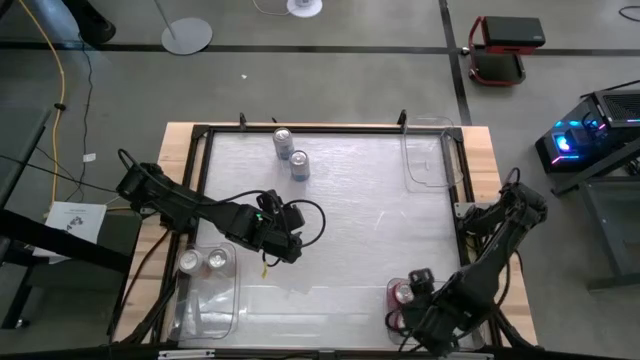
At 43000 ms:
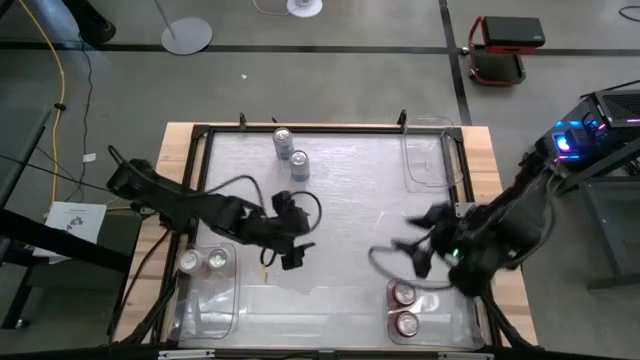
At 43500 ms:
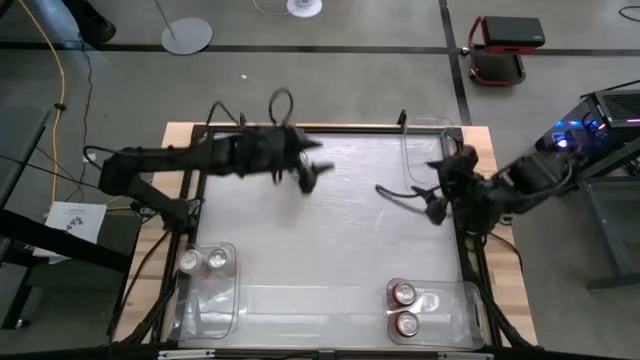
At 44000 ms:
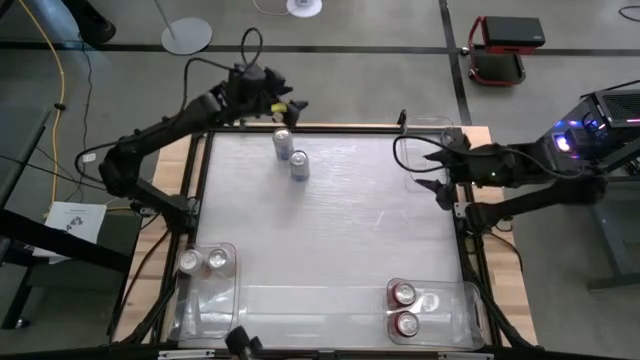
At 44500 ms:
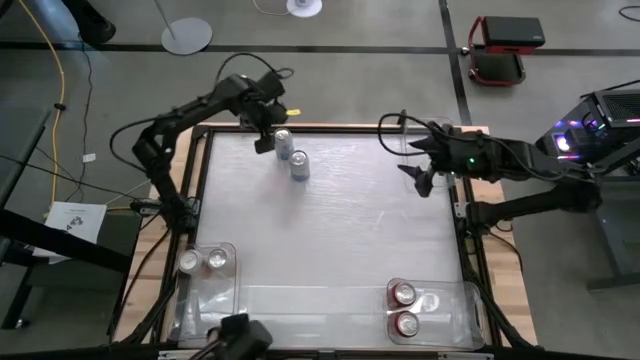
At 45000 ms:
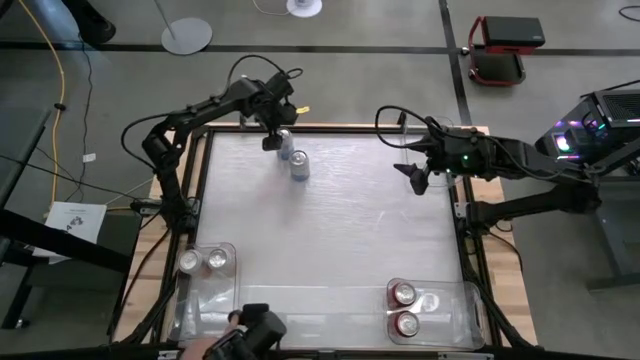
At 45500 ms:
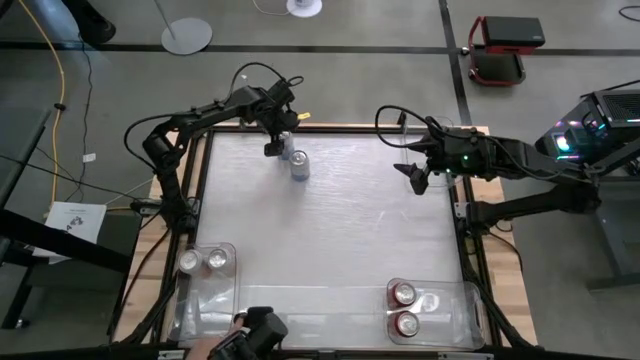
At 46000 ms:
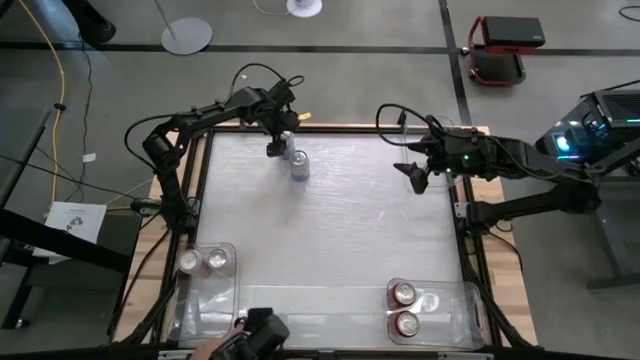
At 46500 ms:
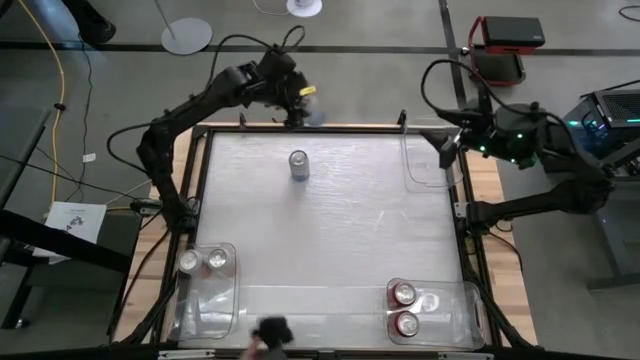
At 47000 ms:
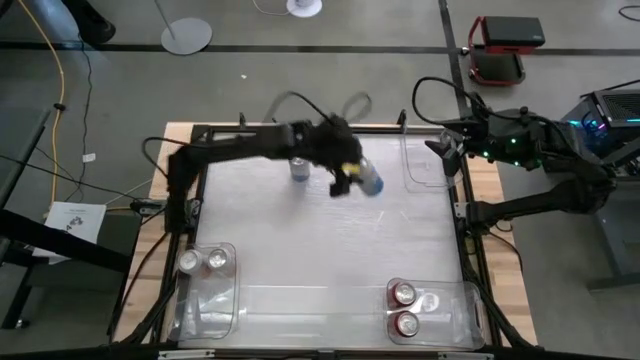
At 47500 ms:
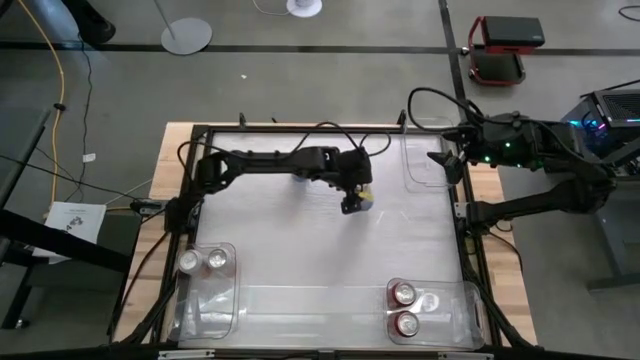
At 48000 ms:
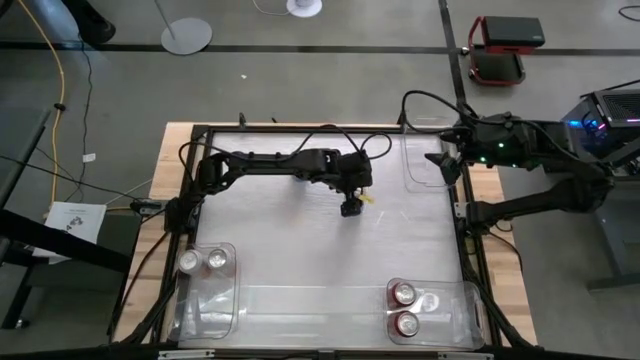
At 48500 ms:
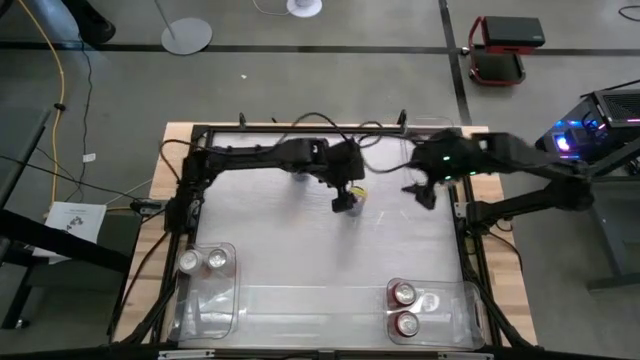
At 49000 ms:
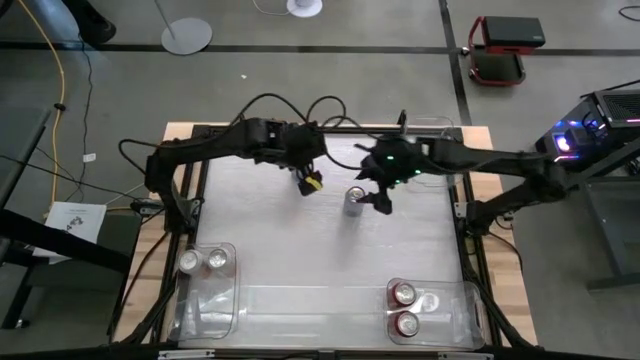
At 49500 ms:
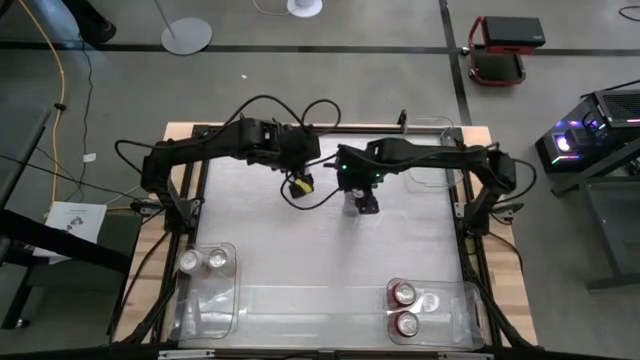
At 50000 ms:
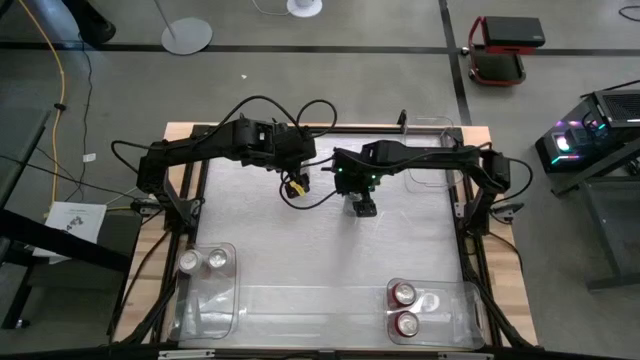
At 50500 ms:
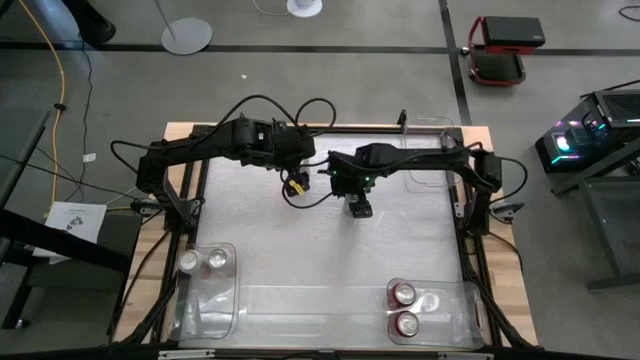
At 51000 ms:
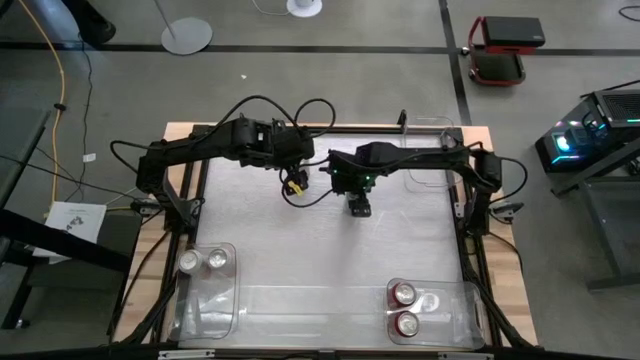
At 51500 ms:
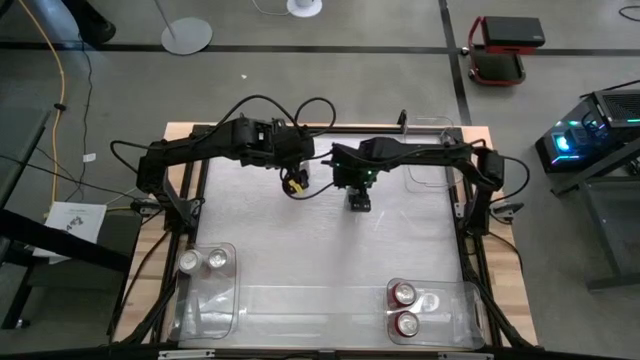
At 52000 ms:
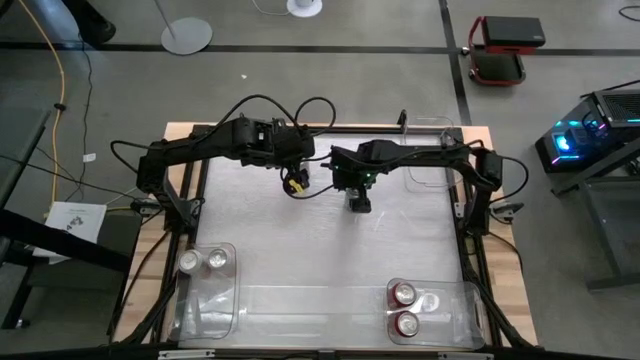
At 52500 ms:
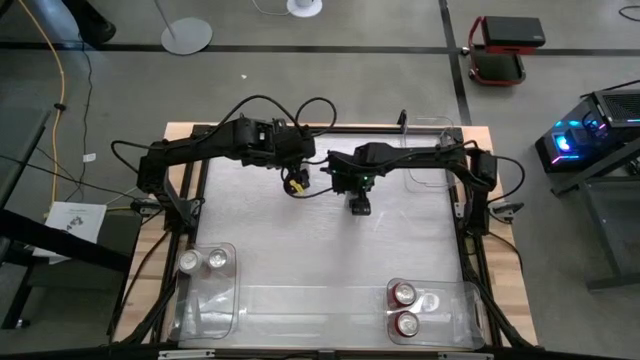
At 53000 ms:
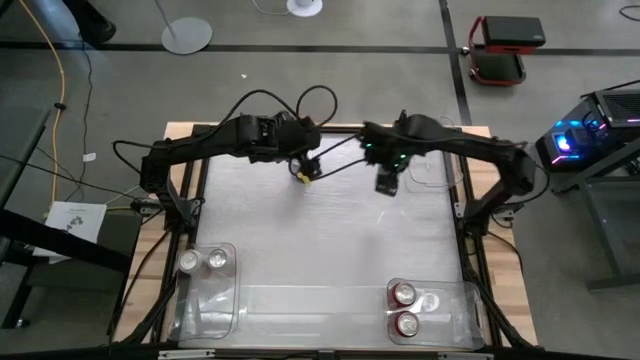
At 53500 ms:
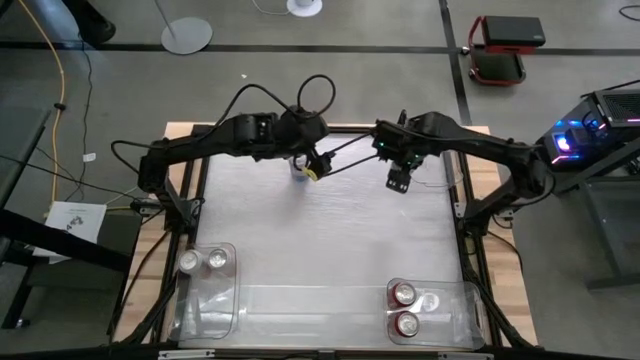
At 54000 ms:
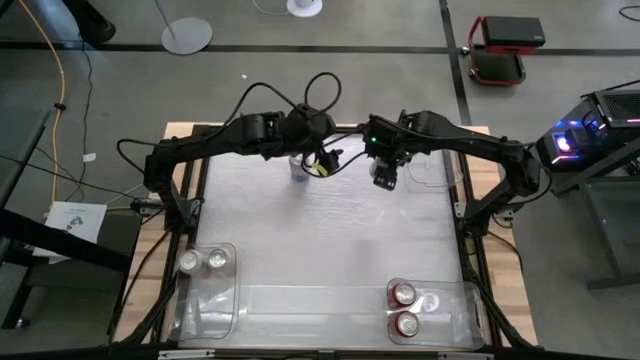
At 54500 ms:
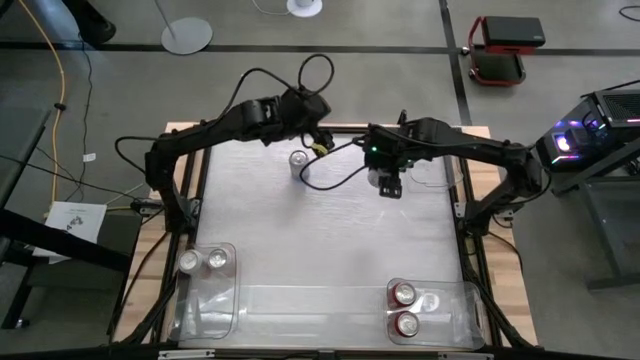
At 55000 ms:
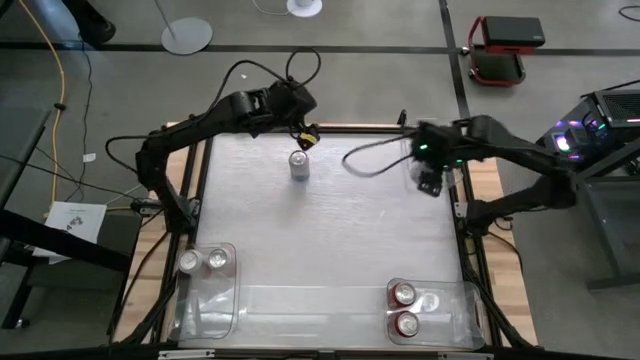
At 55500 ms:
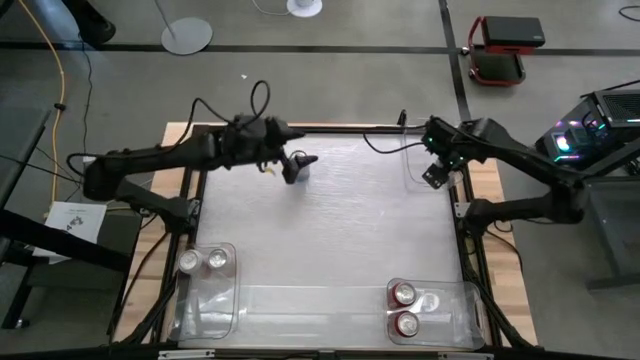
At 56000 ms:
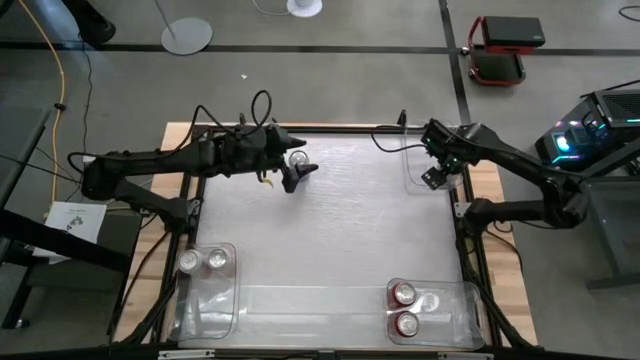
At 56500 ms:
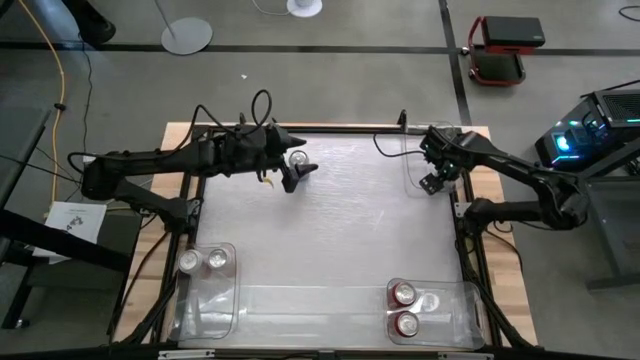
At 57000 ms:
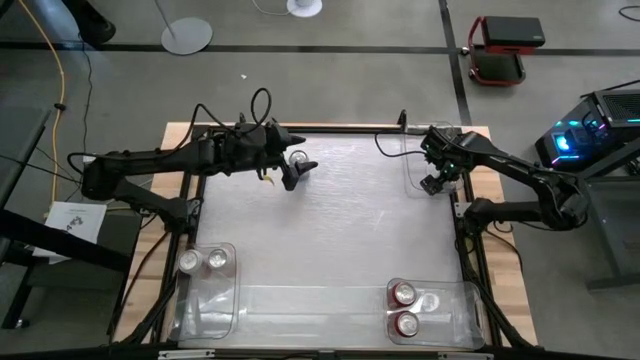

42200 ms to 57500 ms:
Task: Sort soda cans
Put the top blue-white soda can into the top transparent bin

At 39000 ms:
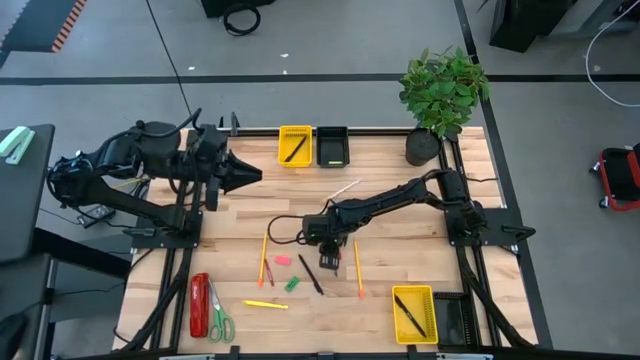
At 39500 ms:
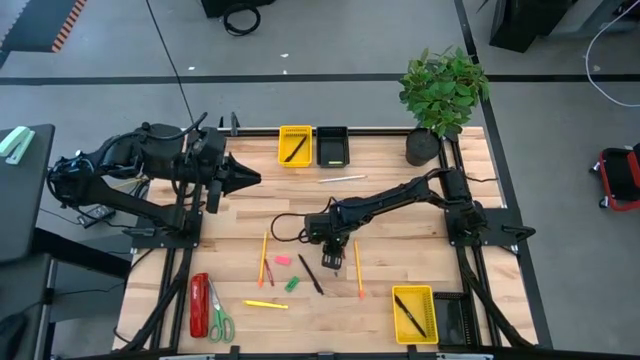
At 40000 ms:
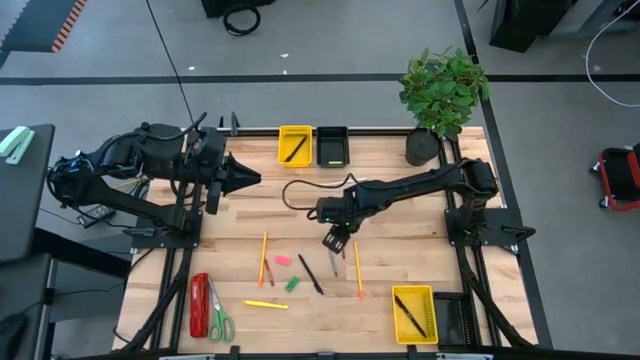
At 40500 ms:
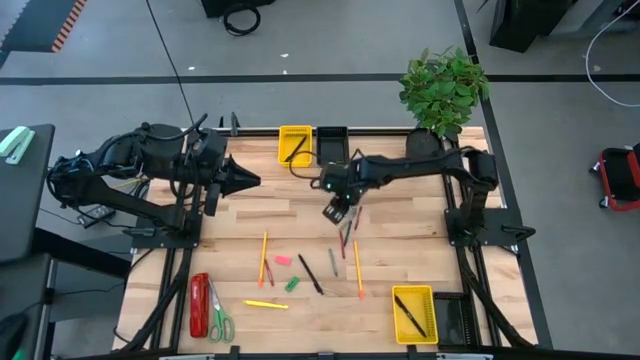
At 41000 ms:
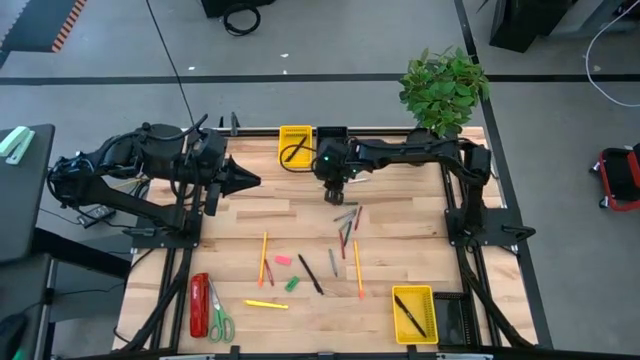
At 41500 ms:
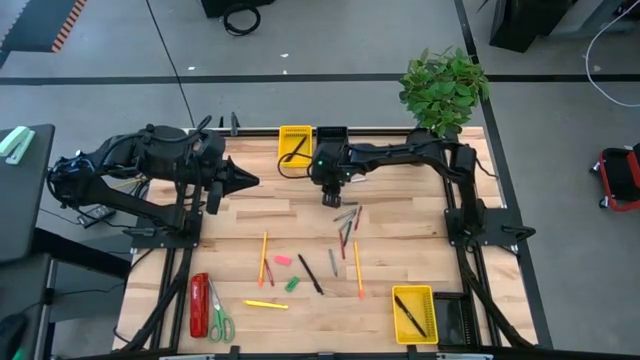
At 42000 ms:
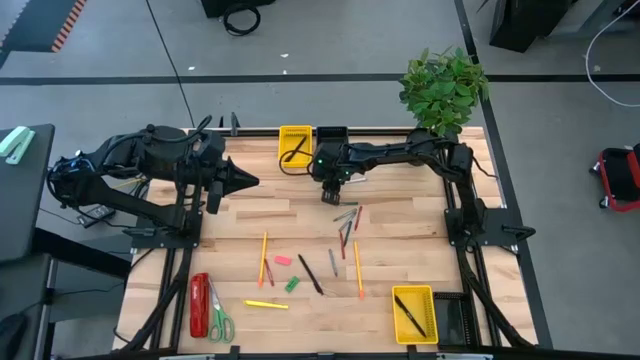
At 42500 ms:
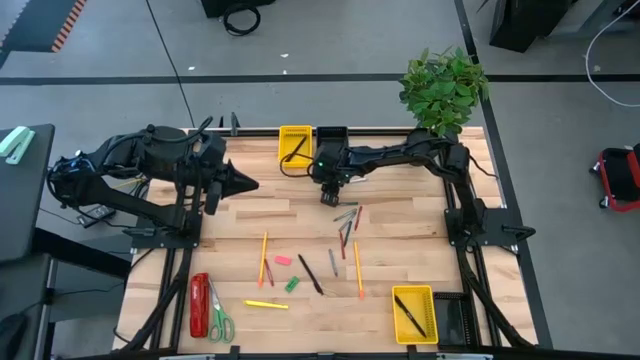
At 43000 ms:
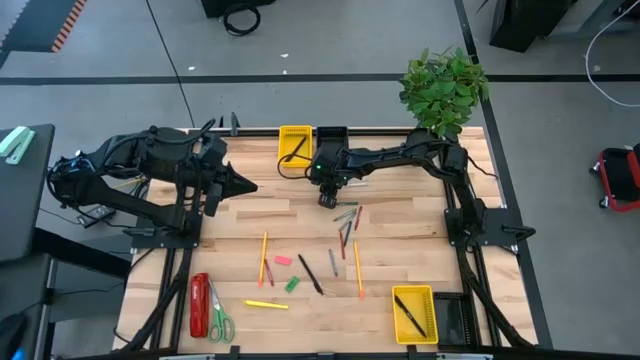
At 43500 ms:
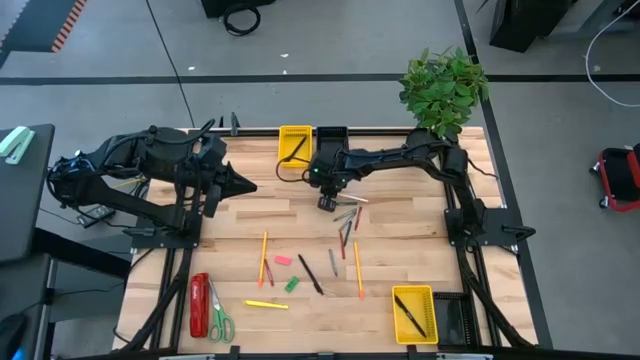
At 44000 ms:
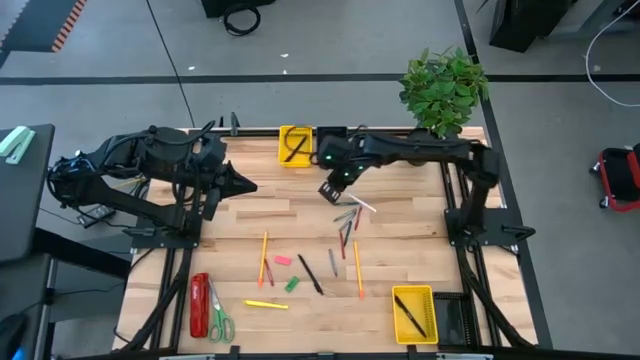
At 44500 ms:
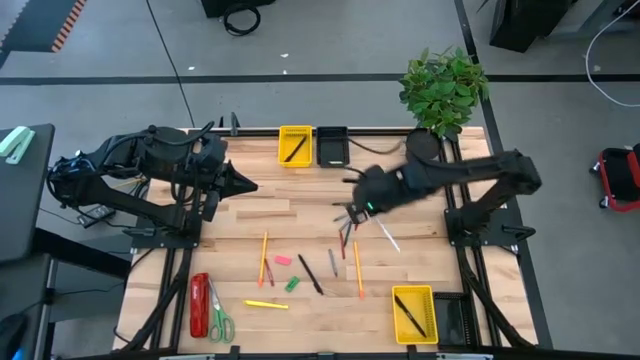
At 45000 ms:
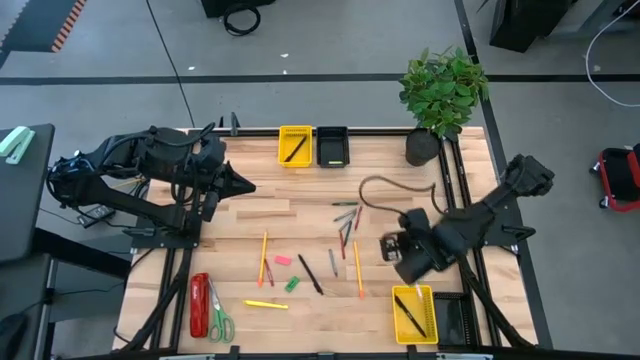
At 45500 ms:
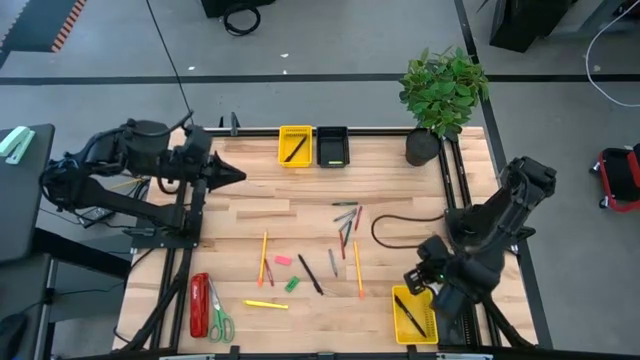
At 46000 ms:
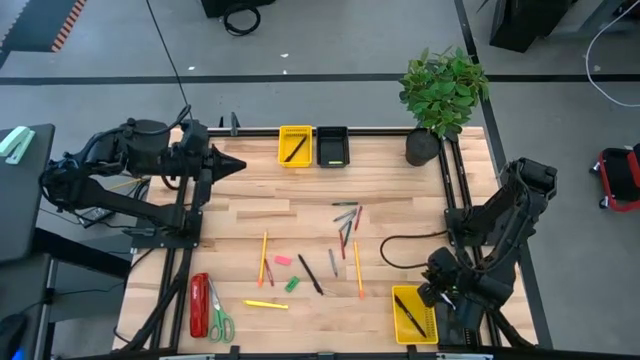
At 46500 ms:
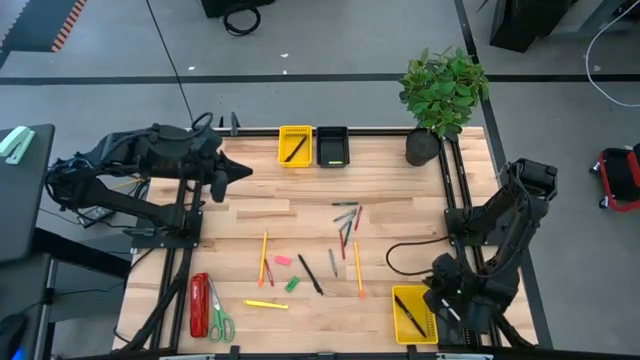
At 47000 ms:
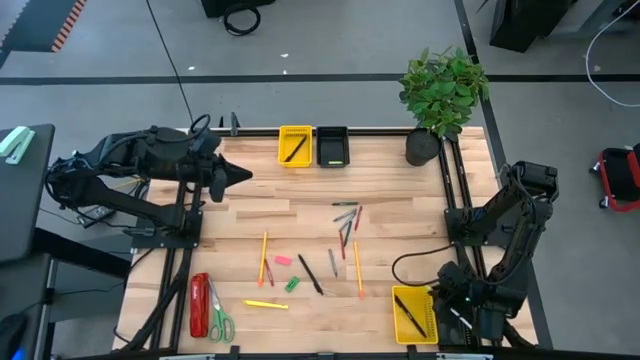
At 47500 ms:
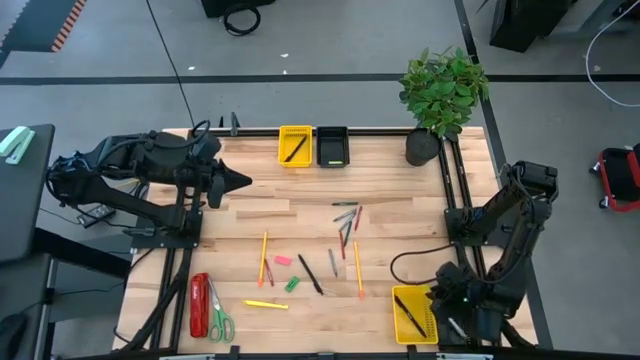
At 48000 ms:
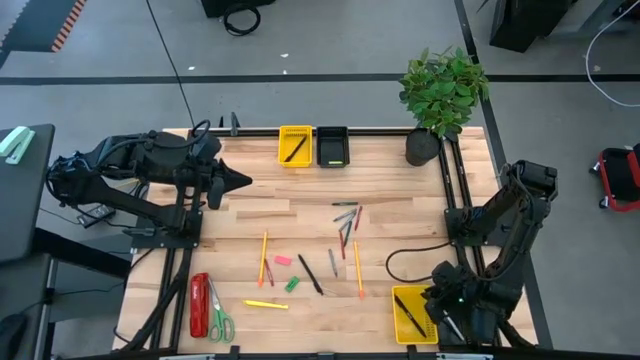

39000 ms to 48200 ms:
Task: Sort crayons/erasers/pens/pencils in bins
Put the white pencil into the bottom black bin
